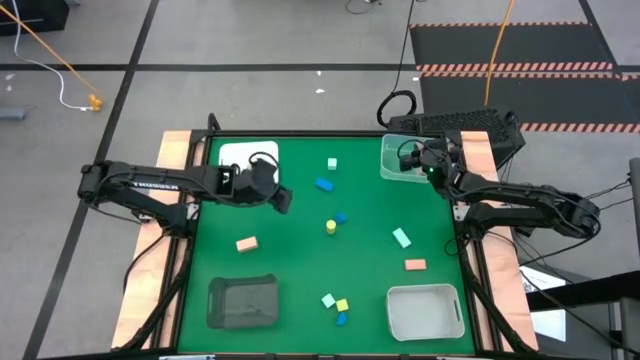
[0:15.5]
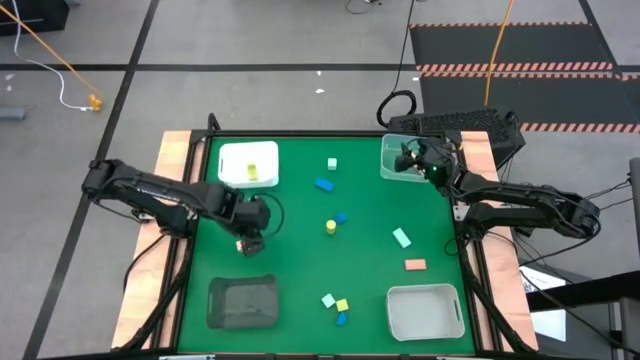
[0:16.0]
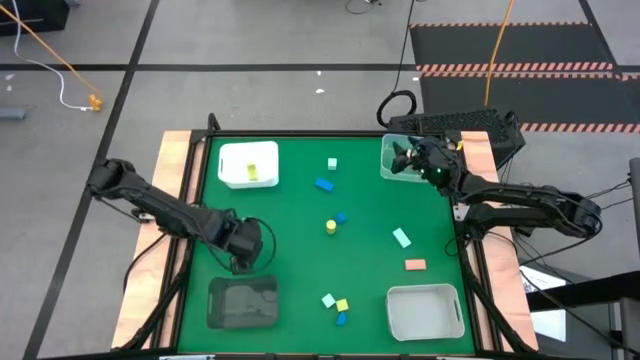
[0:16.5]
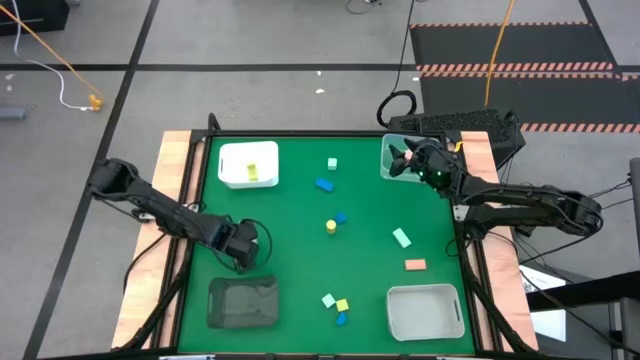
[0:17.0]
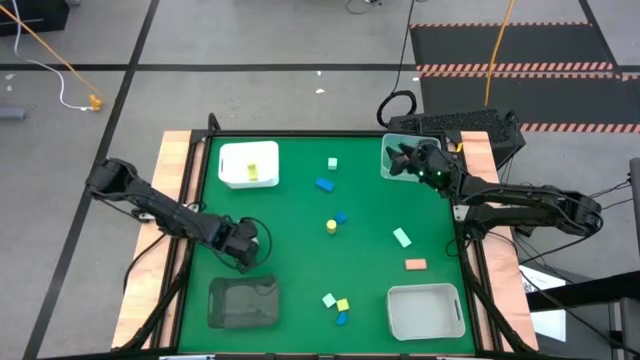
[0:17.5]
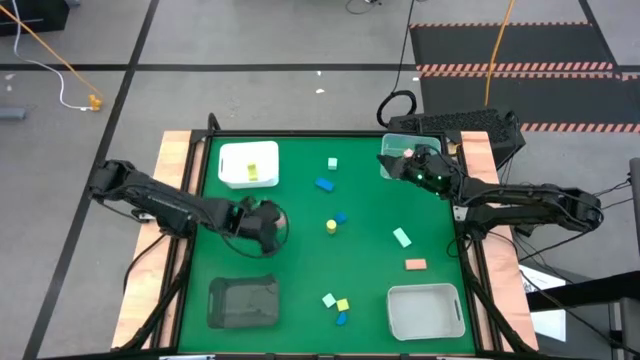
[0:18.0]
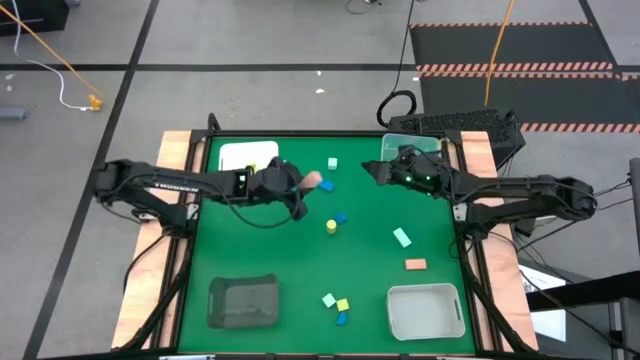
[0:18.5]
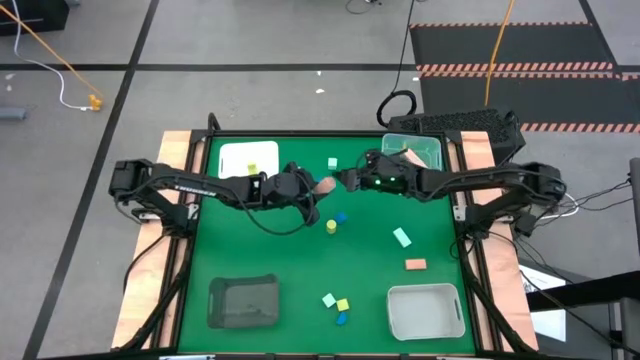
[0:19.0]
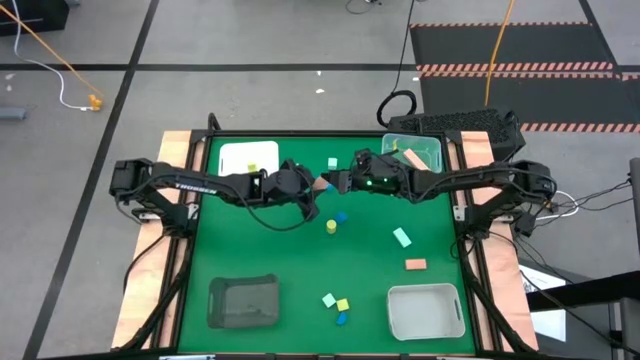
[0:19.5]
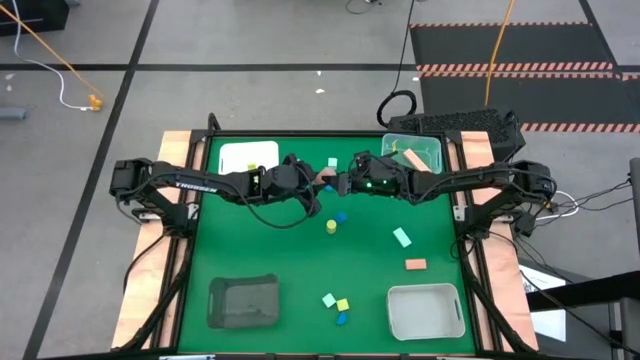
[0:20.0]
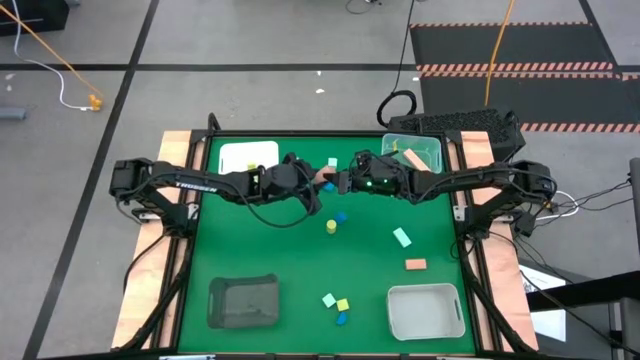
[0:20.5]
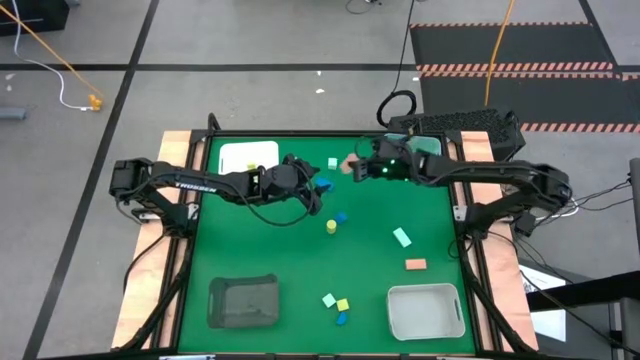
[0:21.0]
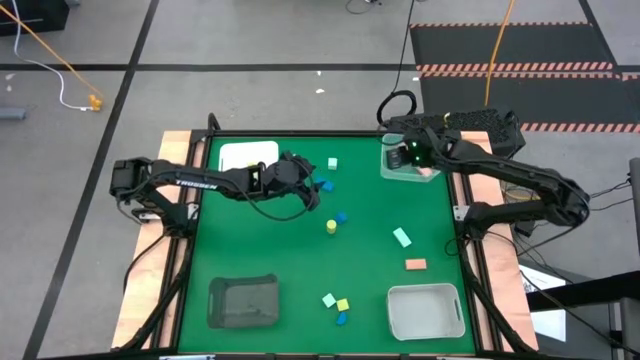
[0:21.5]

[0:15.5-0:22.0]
Task: Sort & place blocks by color
Put the left light brown block into the transparent bin

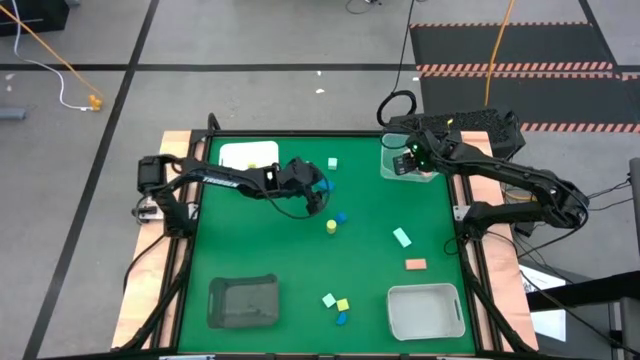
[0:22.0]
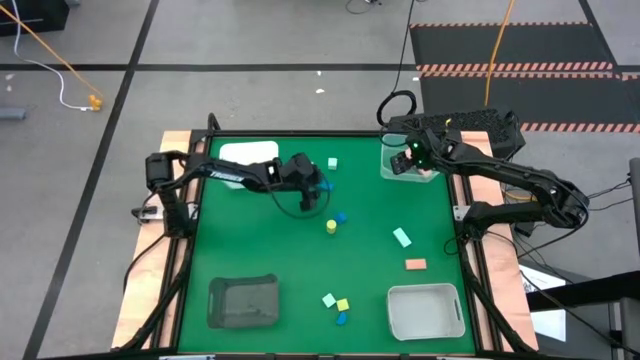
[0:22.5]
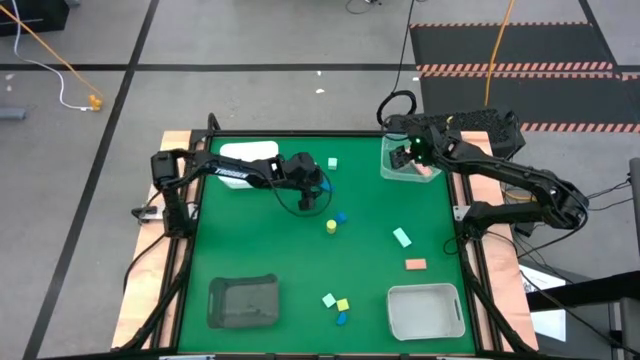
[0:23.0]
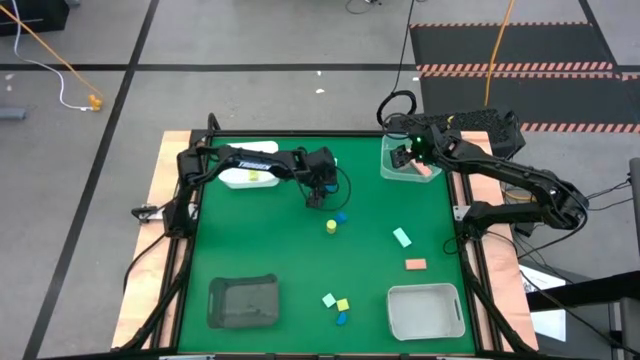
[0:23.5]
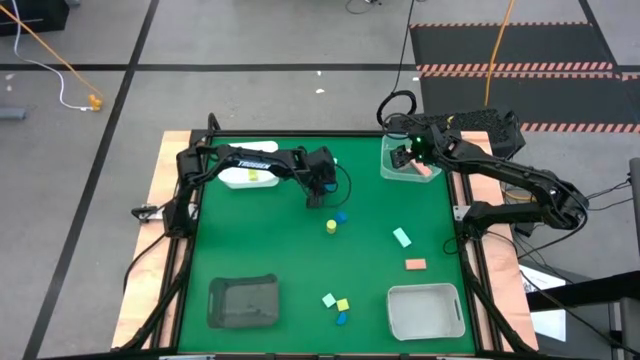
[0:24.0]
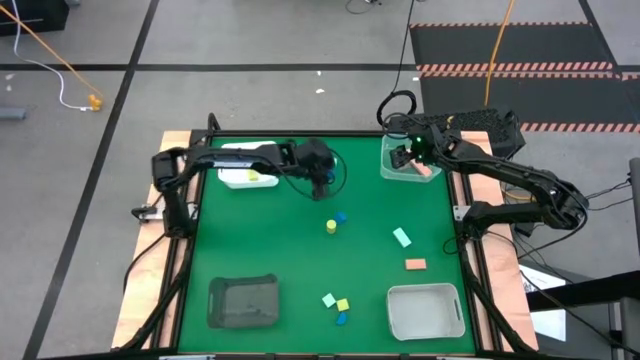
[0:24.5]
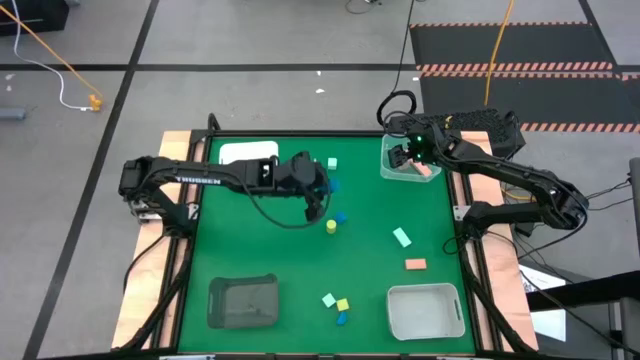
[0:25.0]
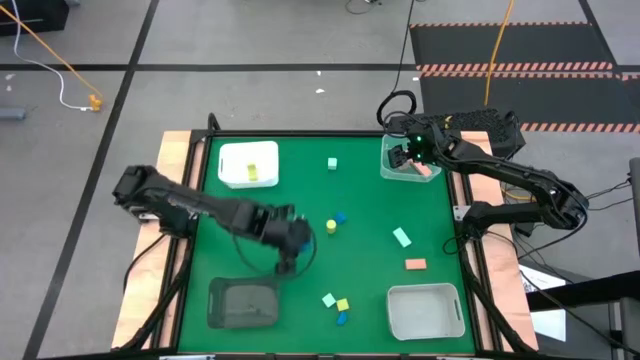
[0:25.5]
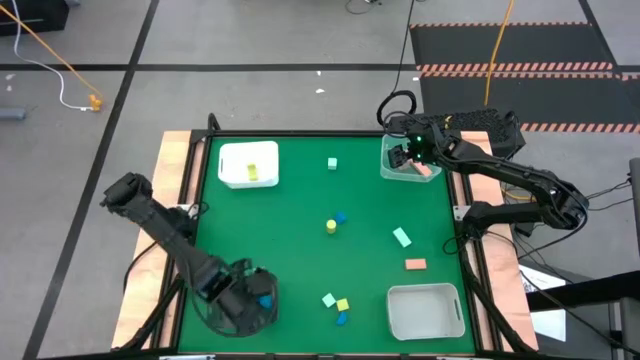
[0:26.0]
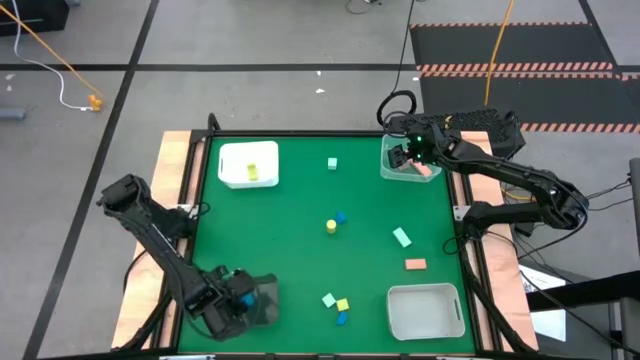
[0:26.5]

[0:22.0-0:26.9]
Put the top blue block into the black bin

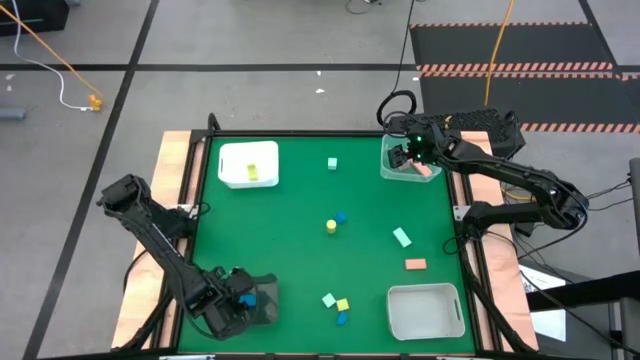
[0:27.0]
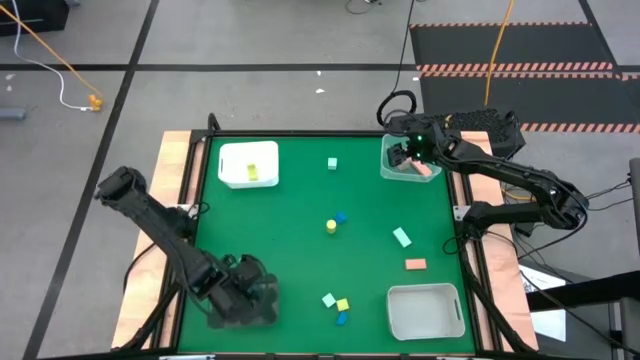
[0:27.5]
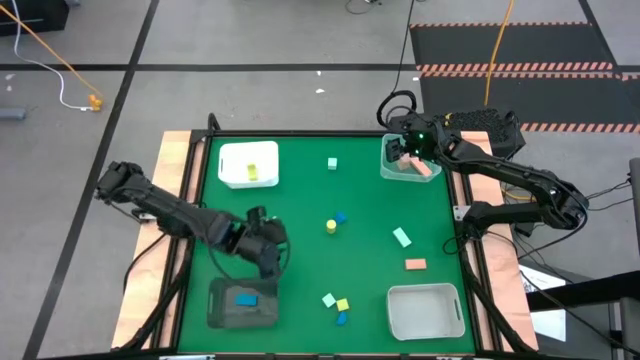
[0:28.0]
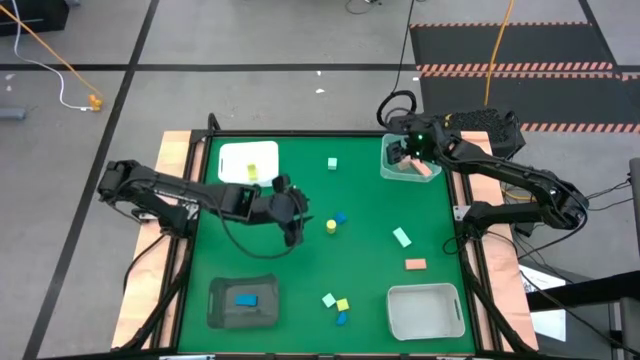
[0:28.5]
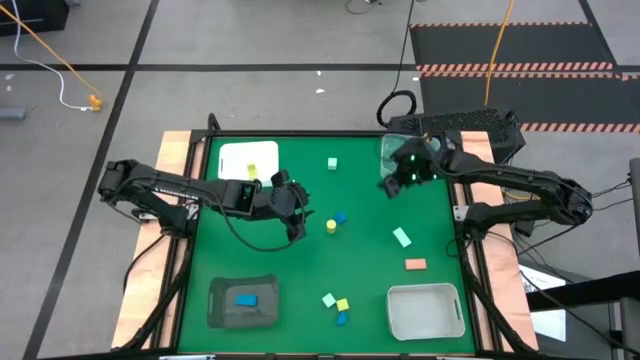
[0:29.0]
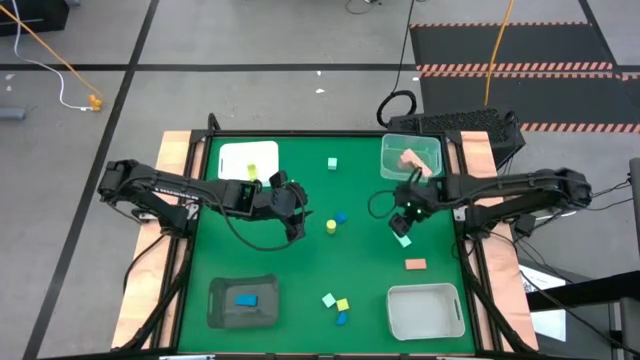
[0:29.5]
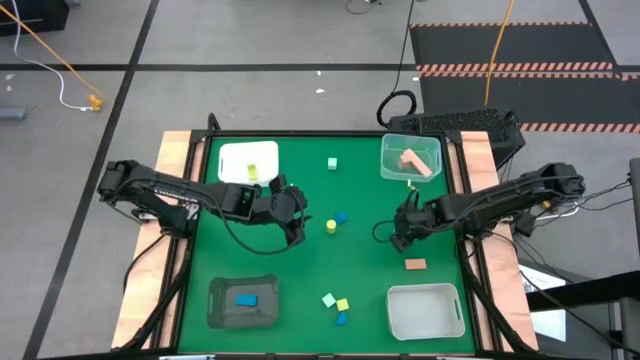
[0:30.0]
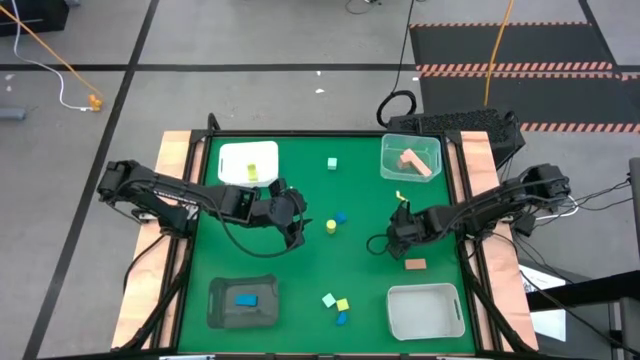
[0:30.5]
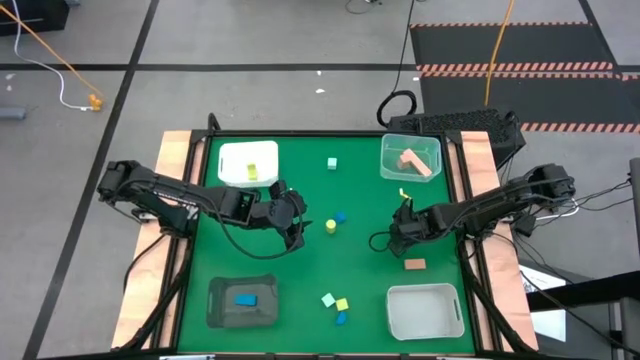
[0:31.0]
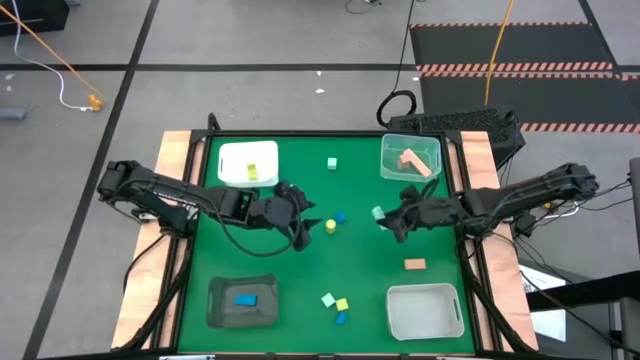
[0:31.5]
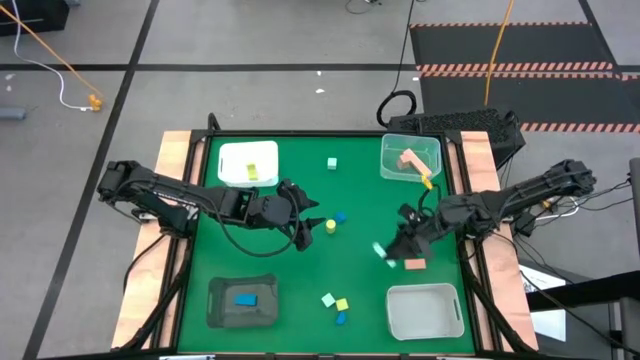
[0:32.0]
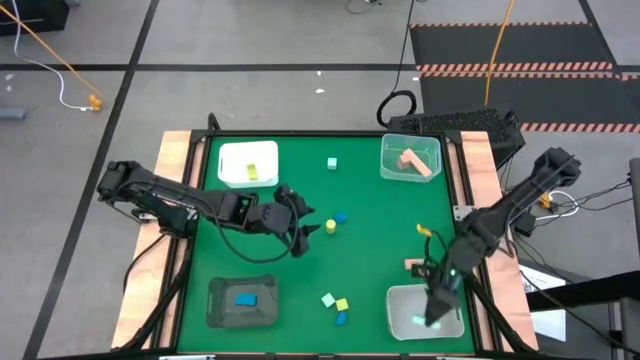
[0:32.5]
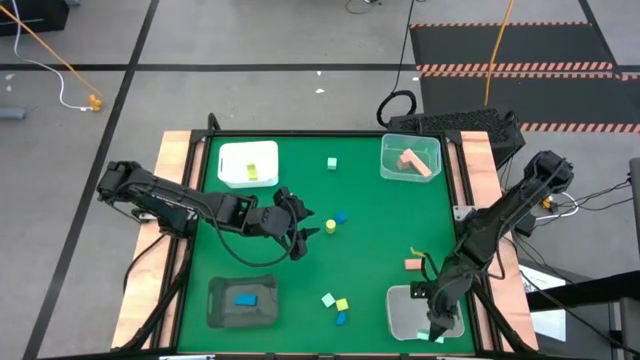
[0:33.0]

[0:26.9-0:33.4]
Put the middle light blue block into the gray bin

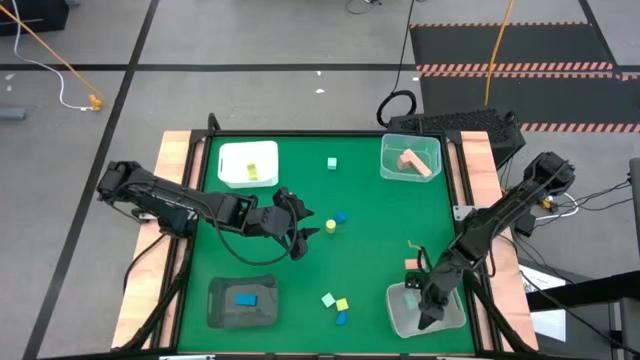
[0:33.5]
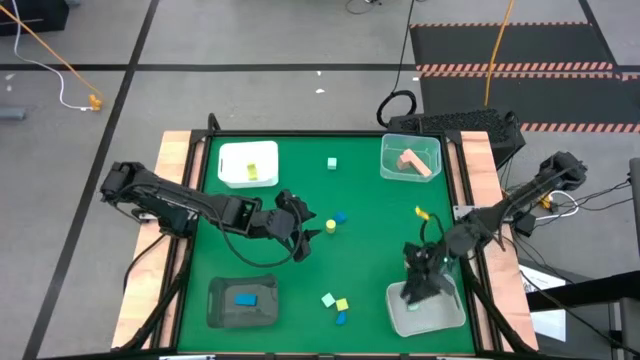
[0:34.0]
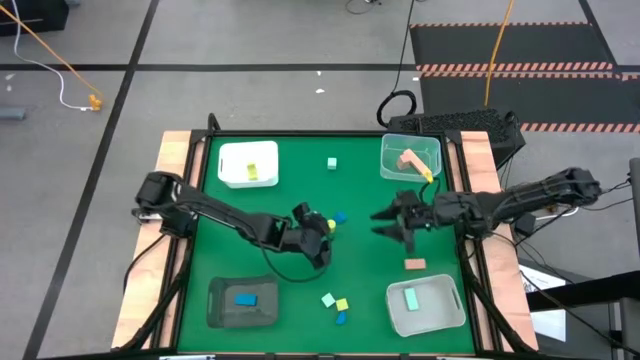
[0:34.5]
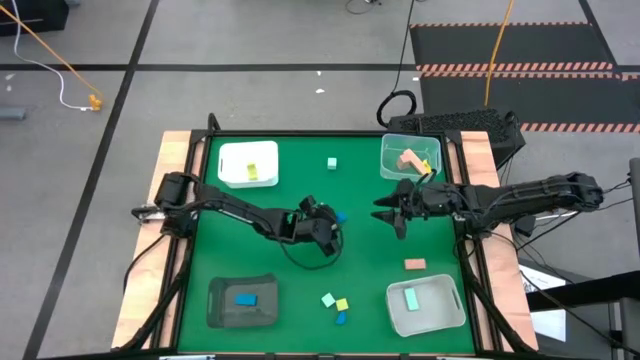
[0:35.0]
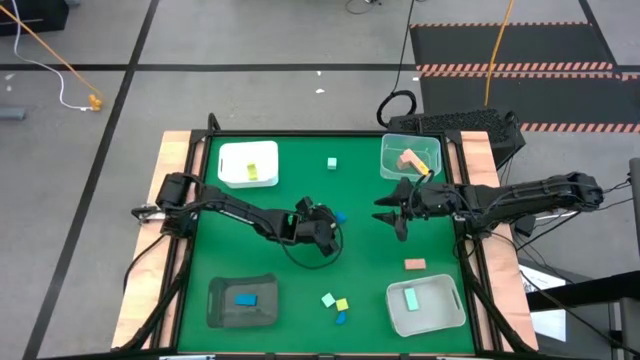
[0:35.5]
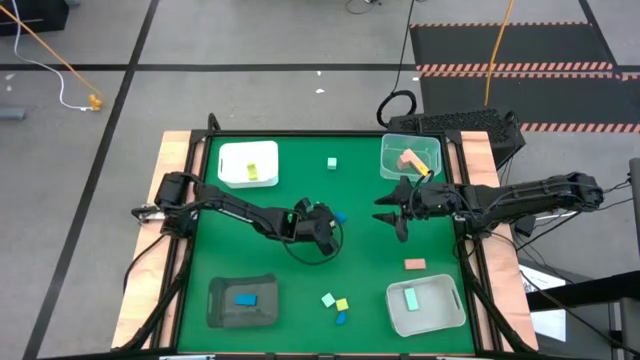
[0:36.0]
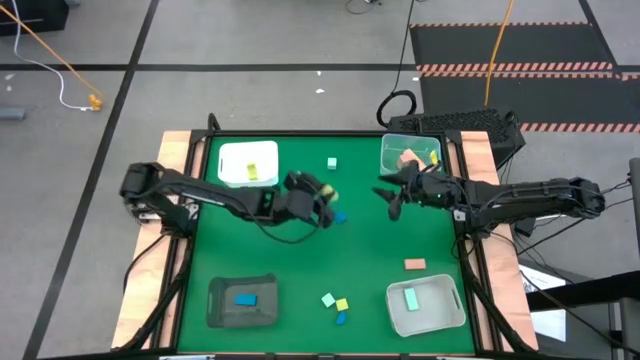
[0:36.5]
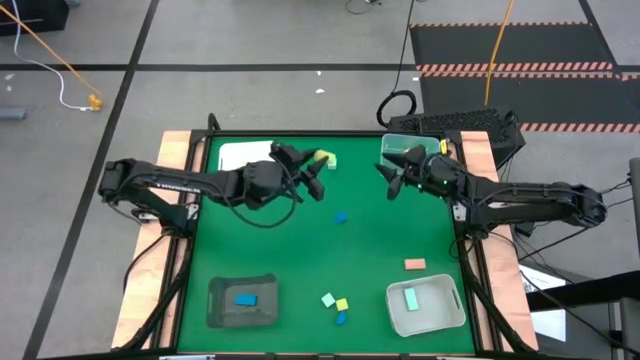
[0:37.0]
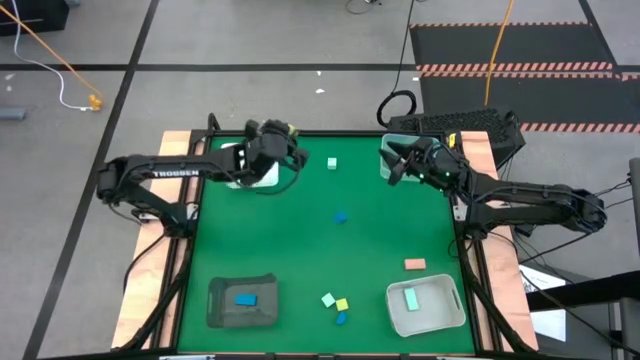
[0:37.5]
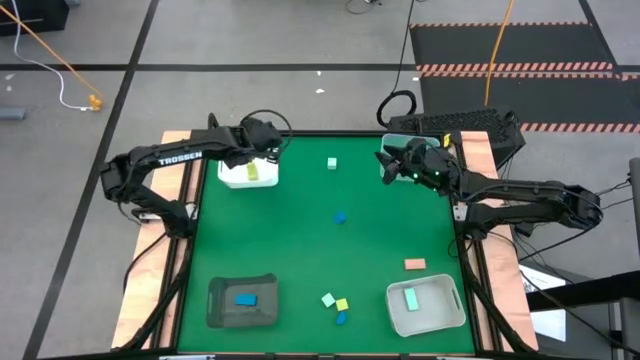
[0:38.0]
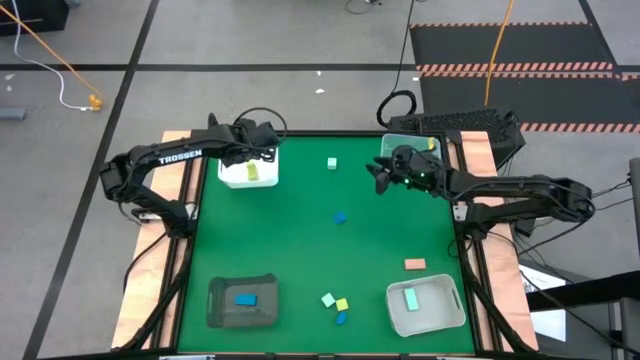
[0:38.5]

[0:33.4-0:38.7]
Put the top green block into the white bin
